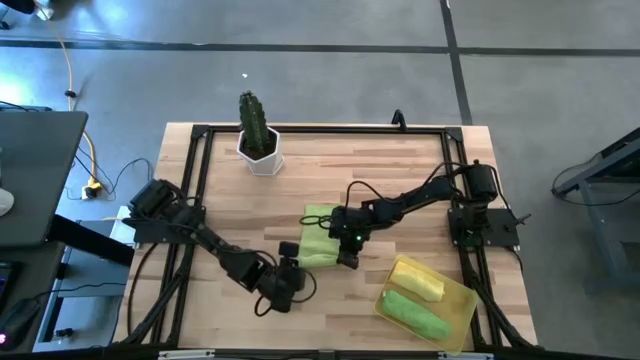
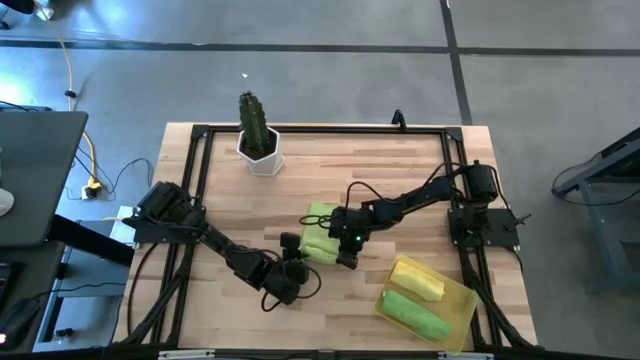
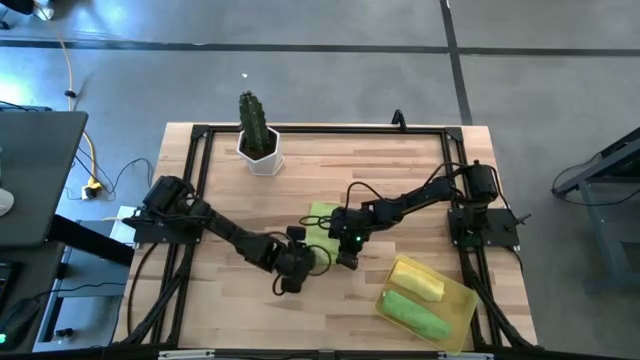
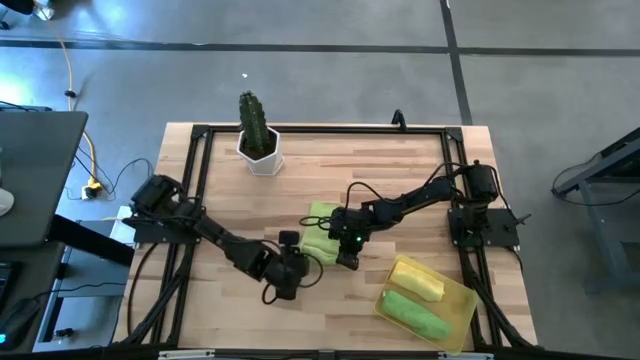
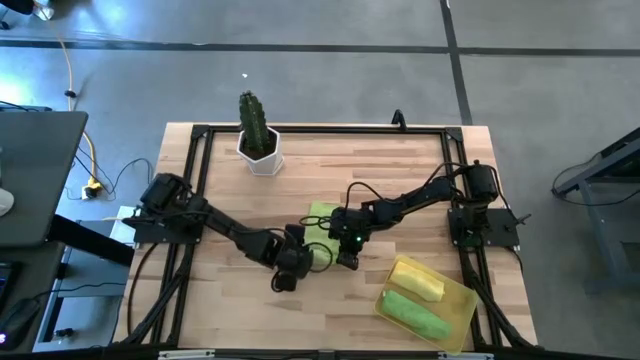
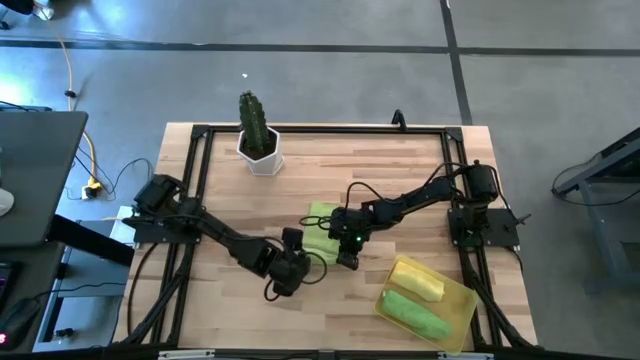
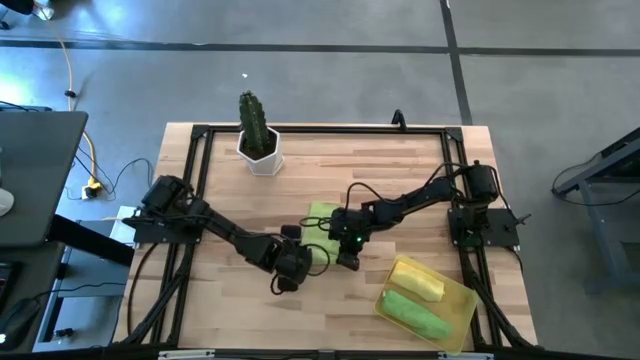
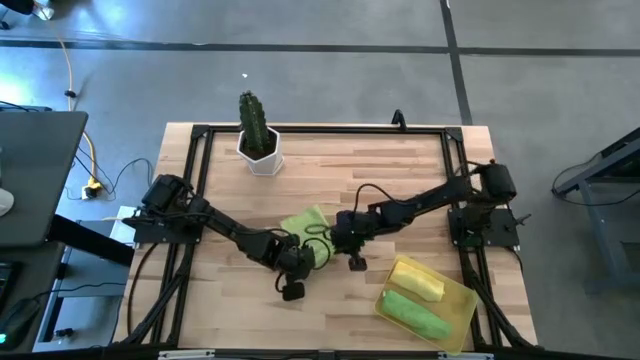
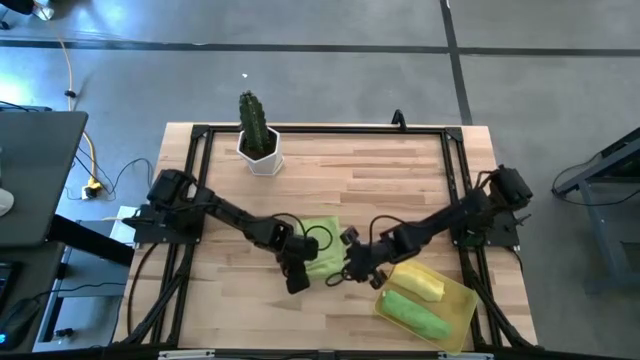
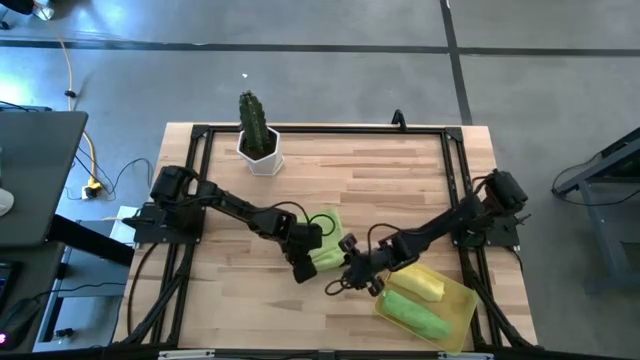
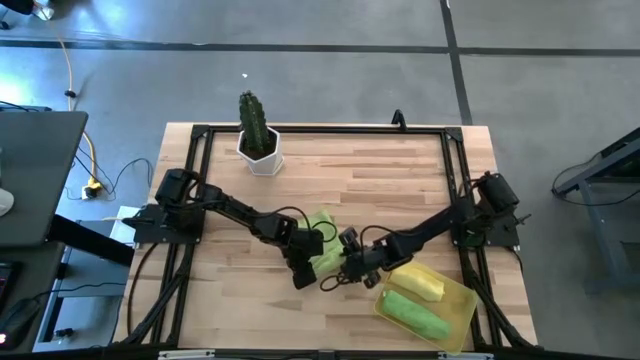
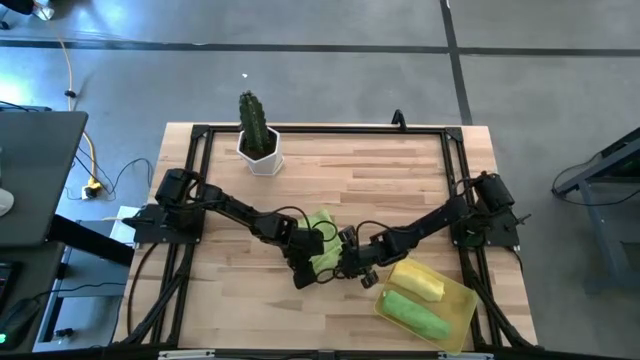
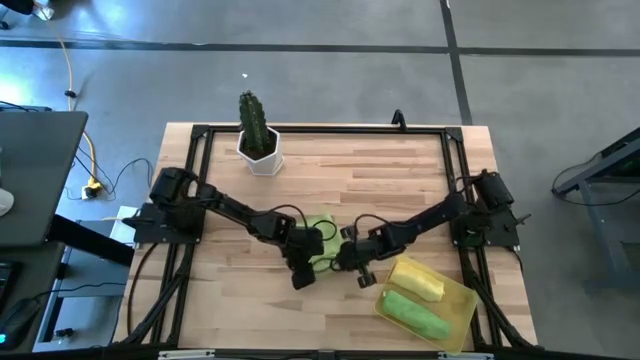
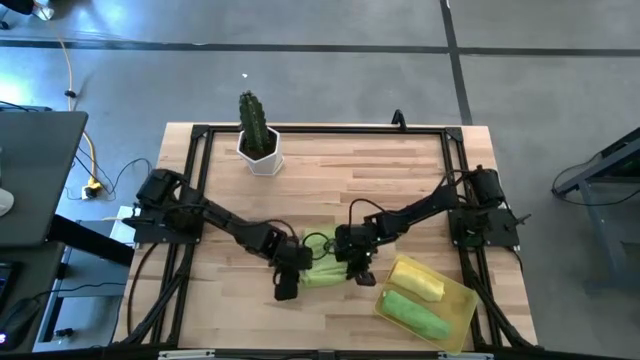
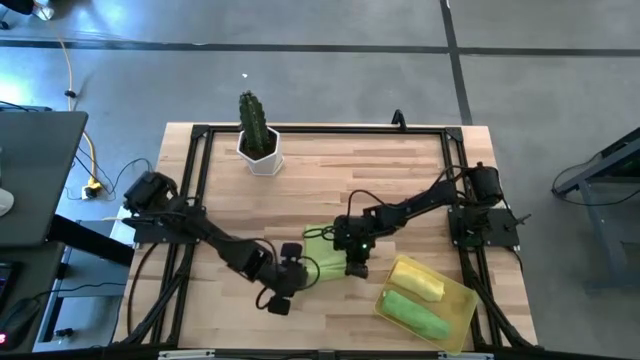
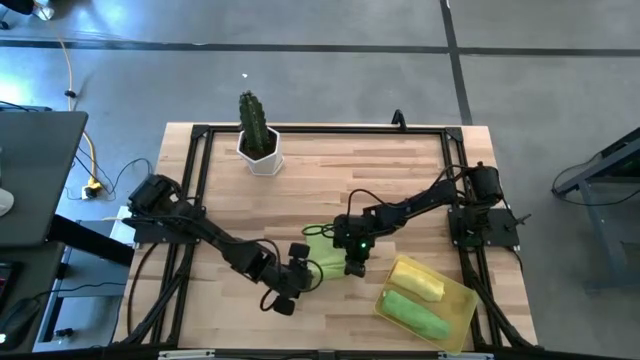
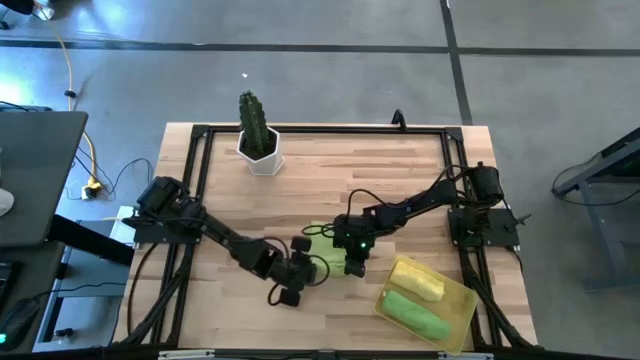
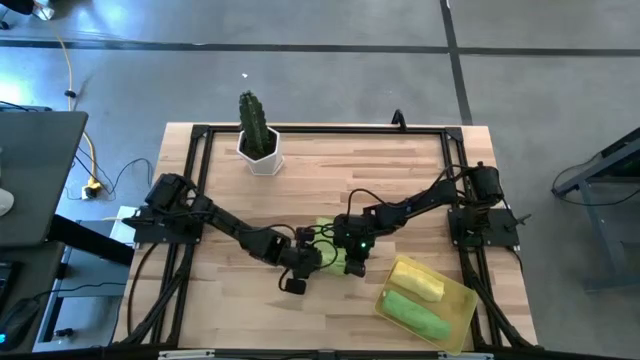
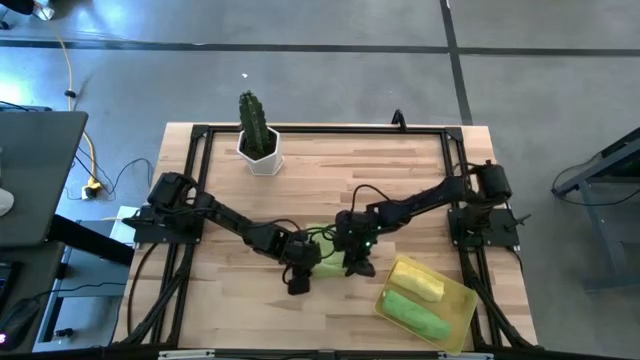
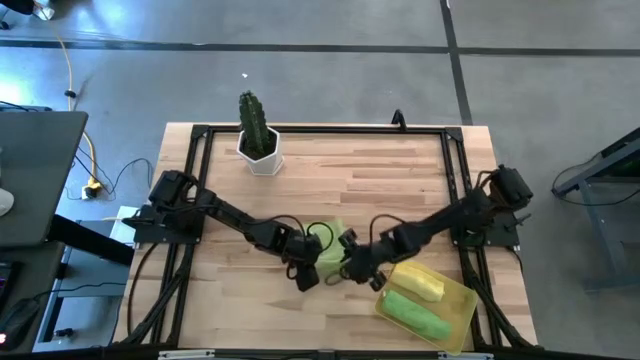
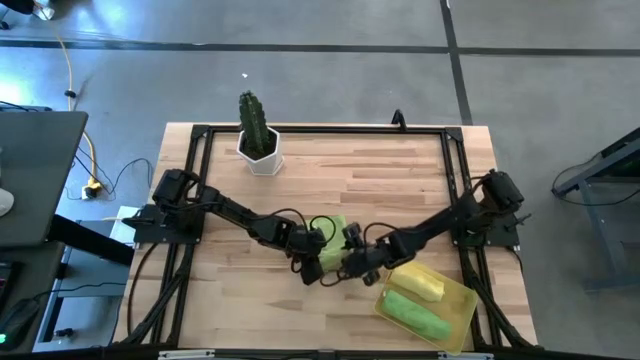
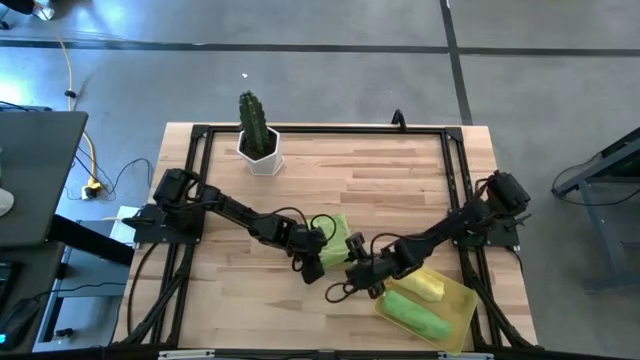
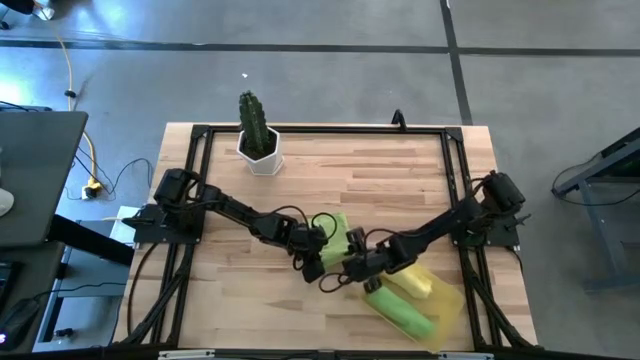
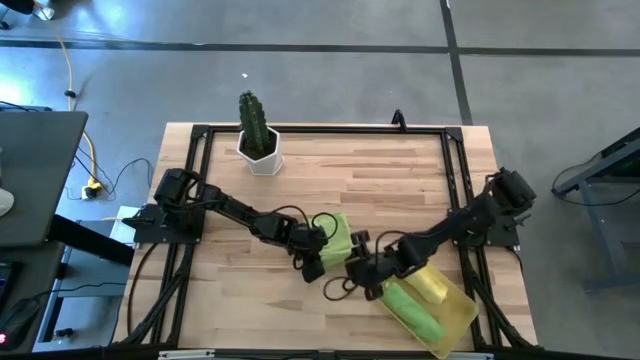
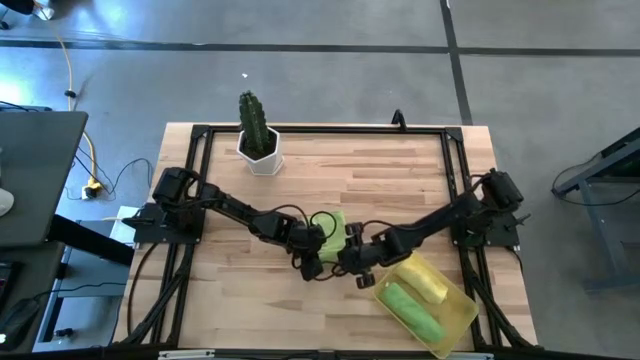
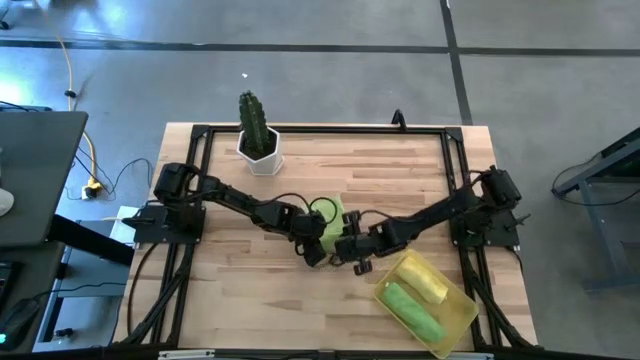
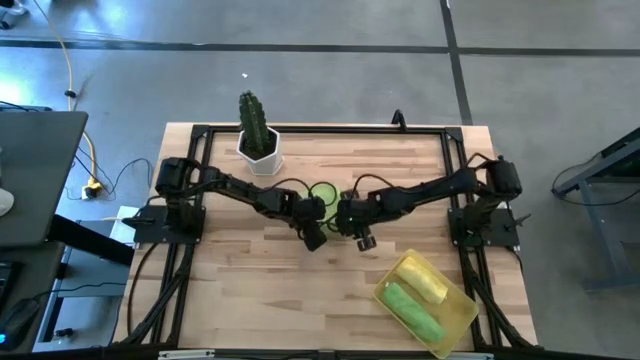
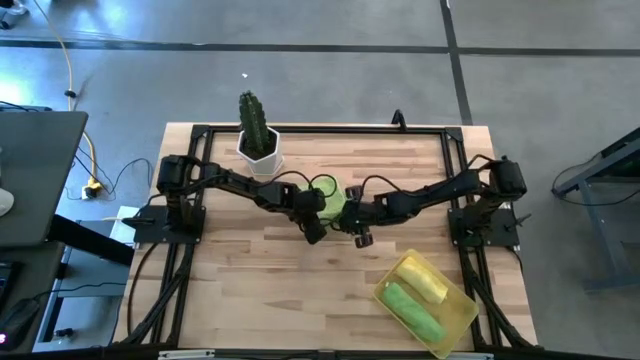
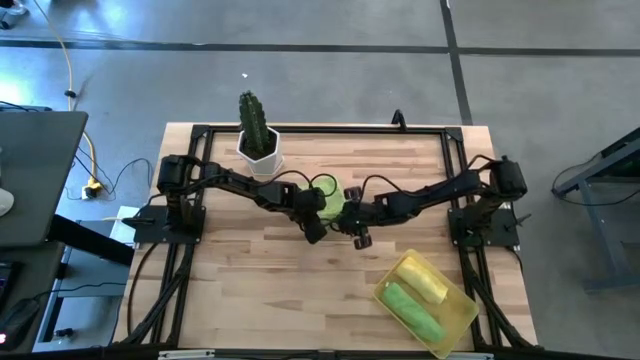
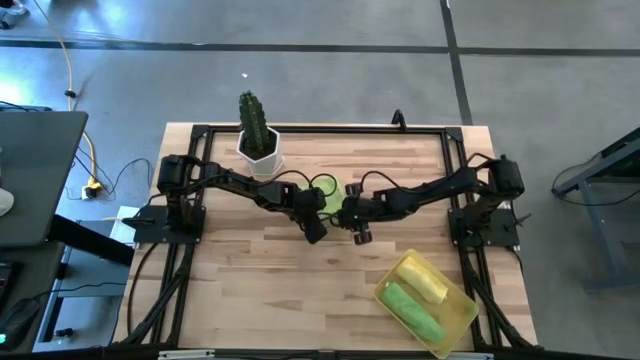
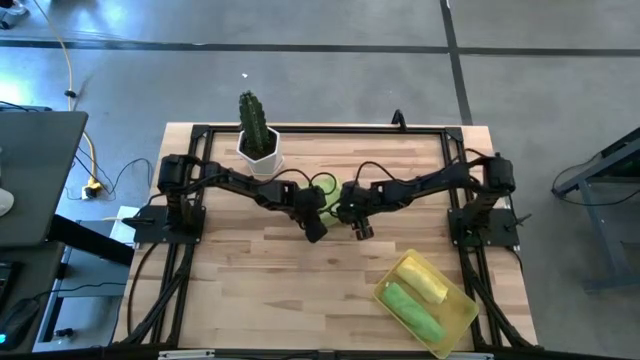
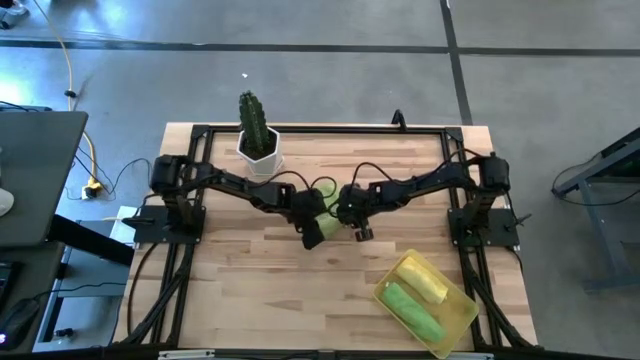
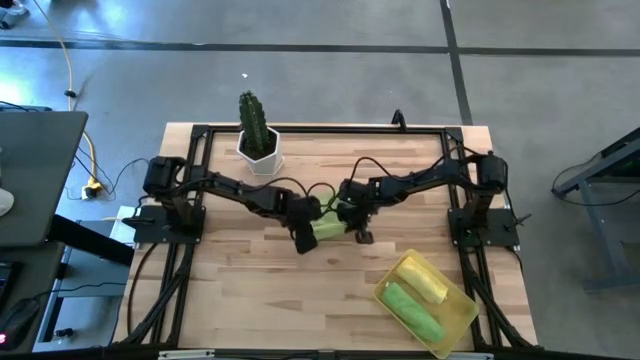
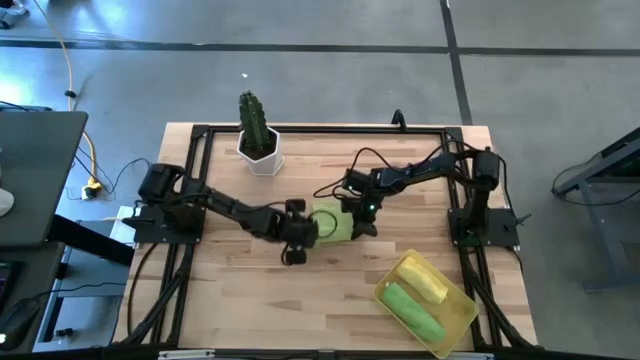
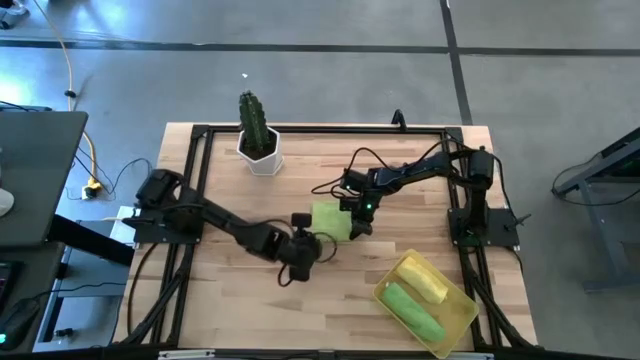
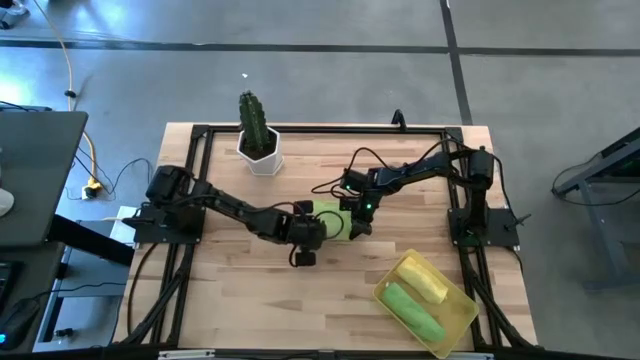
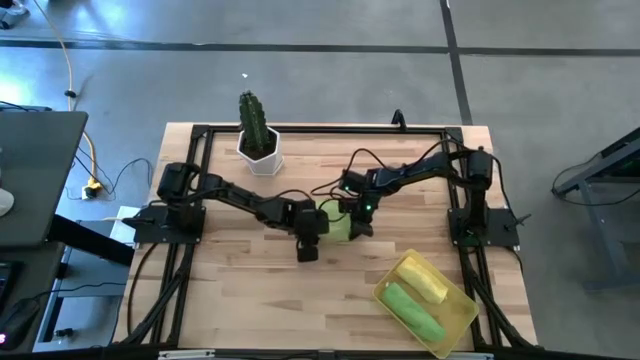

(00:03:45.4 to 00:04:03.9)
Task: Roll microfiber towels into tight, uniform cylinder then place into a basket
Roll the light green towel

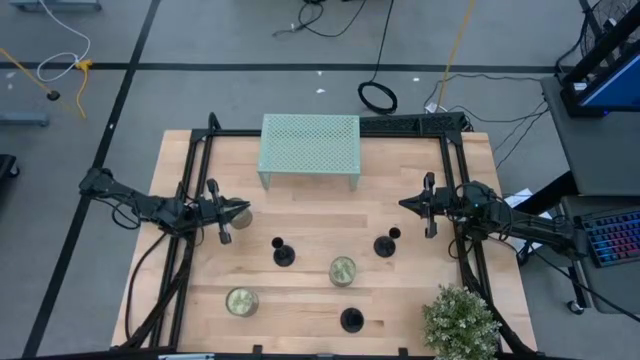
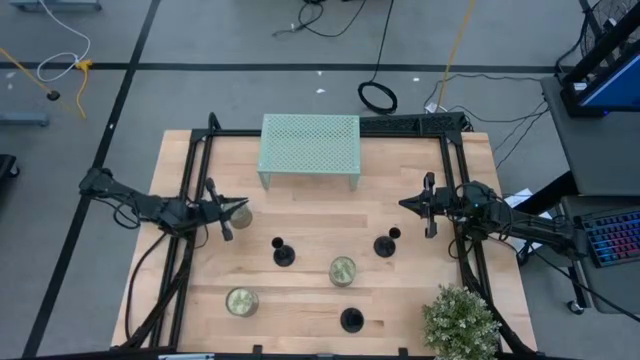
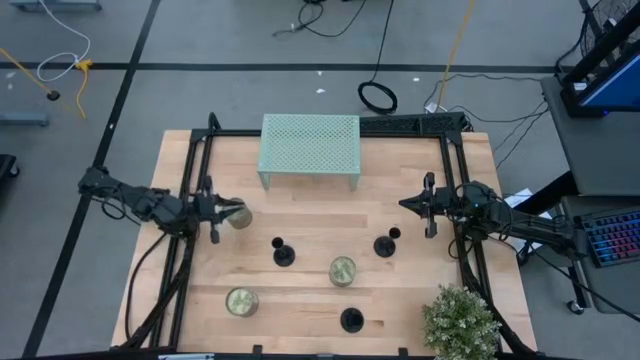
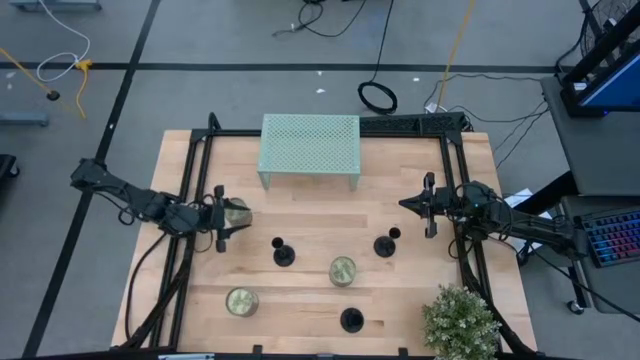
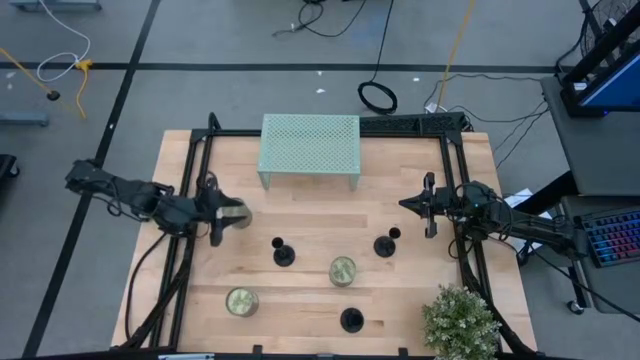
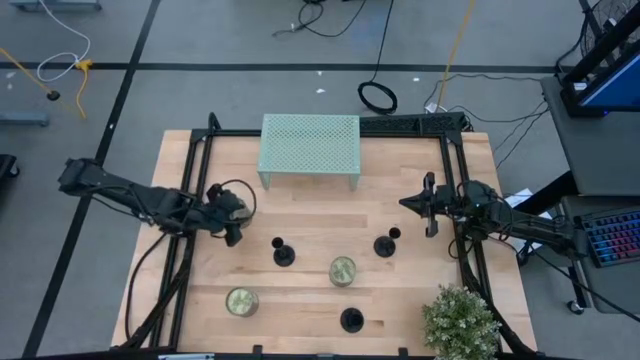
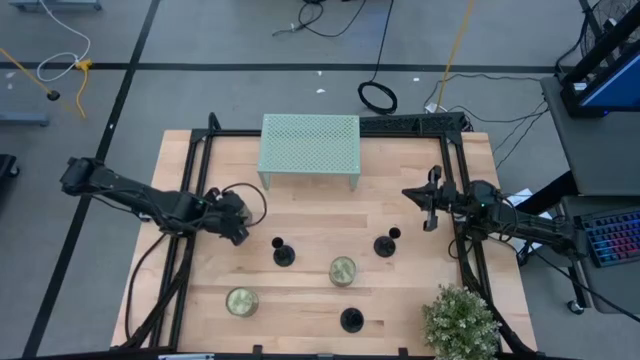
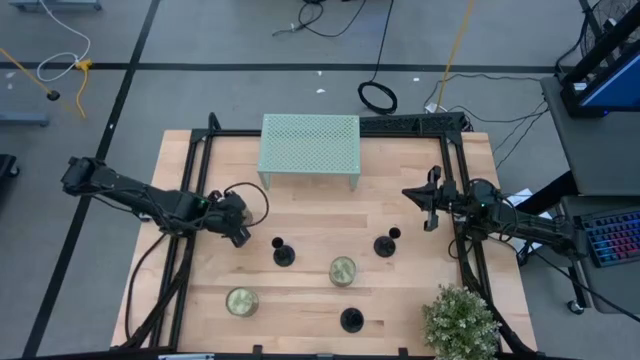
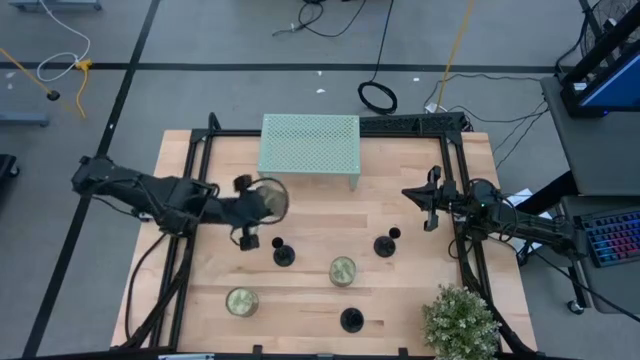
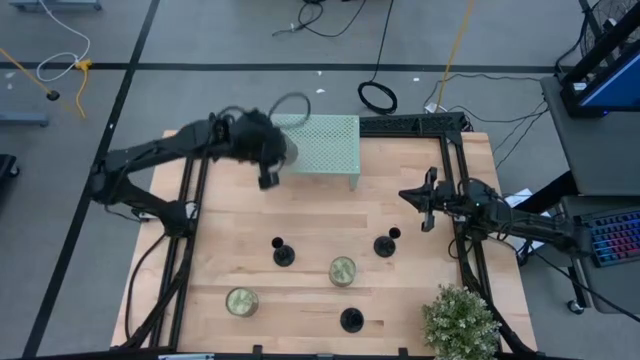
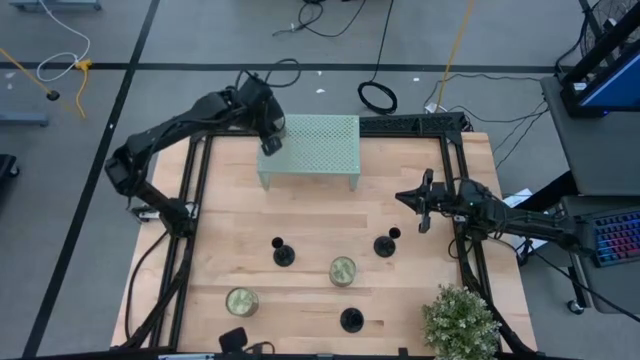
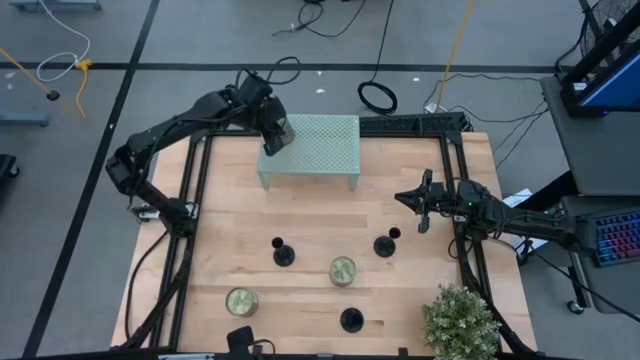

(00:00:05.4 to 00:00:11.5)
Task: Pick & Place candle stick holders
Put the top scented candle on the shelf
